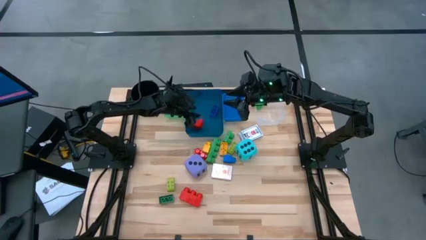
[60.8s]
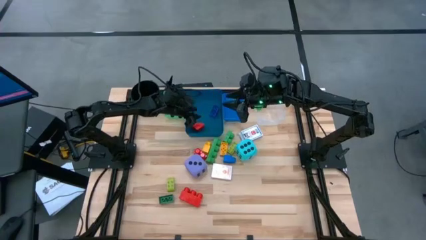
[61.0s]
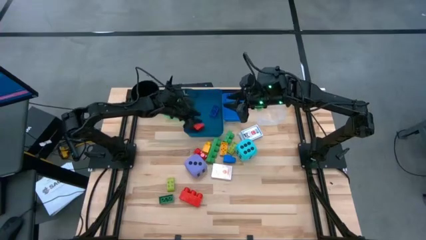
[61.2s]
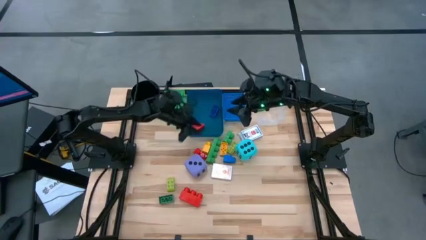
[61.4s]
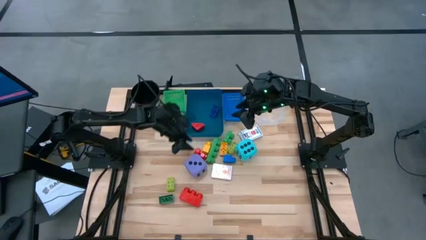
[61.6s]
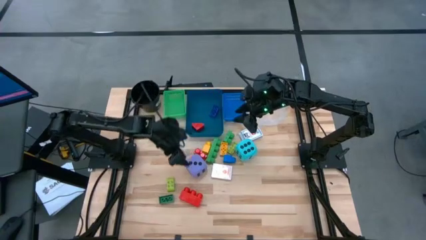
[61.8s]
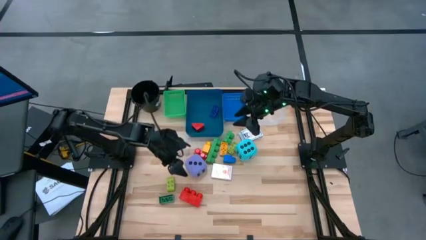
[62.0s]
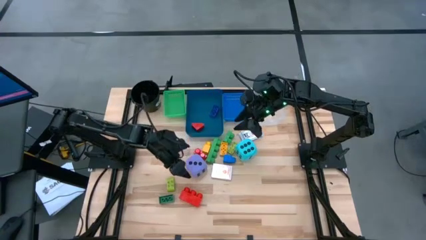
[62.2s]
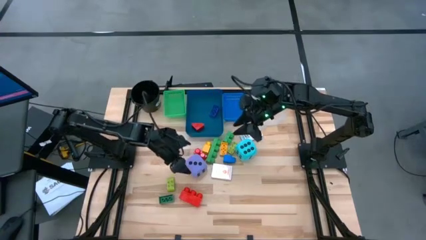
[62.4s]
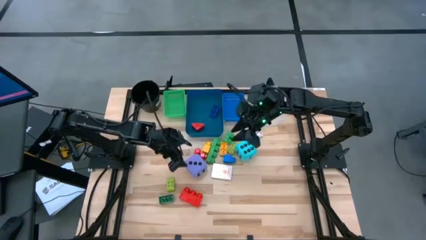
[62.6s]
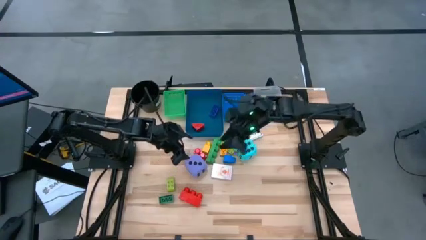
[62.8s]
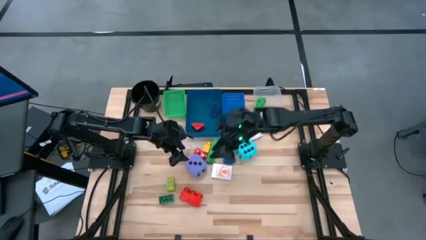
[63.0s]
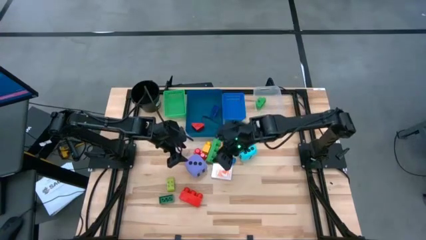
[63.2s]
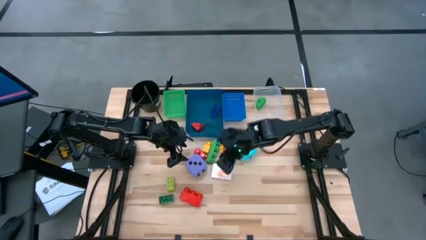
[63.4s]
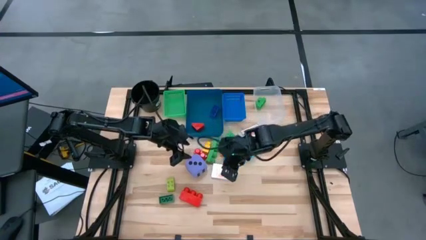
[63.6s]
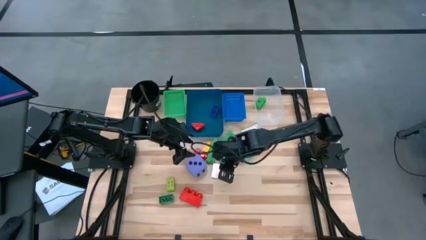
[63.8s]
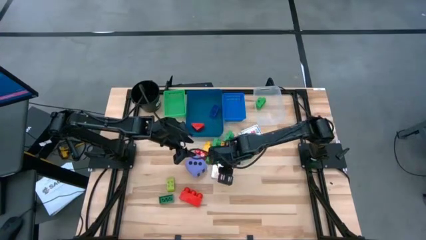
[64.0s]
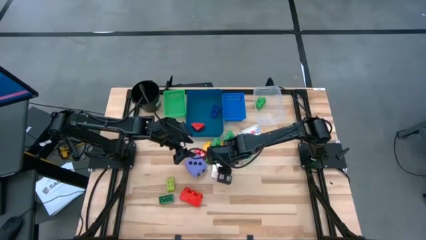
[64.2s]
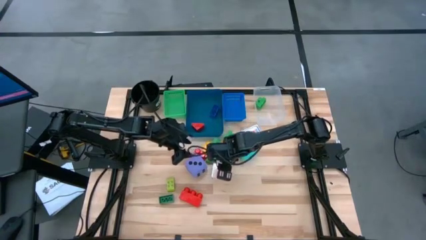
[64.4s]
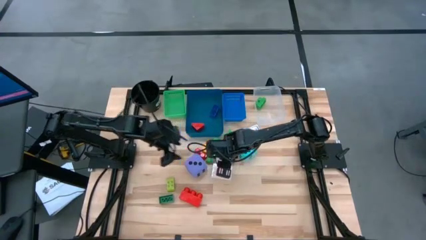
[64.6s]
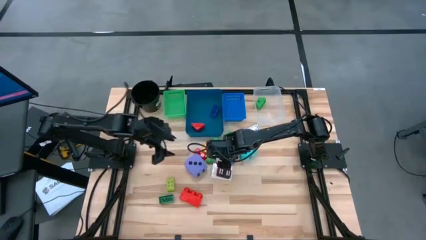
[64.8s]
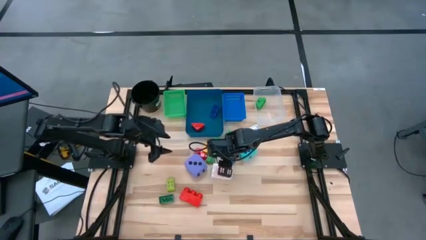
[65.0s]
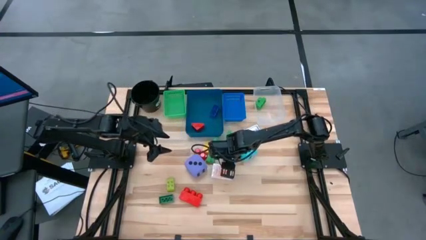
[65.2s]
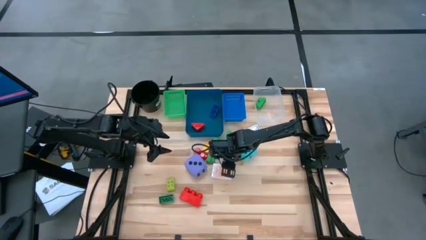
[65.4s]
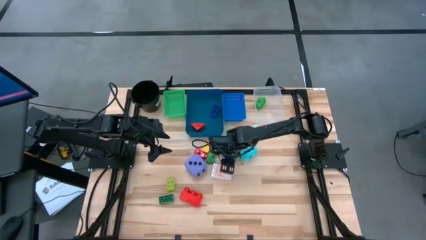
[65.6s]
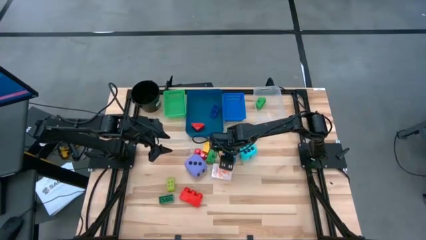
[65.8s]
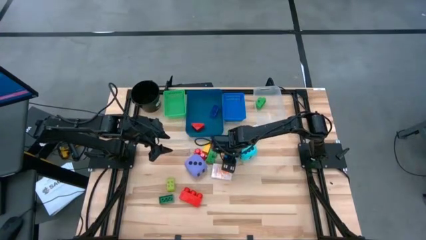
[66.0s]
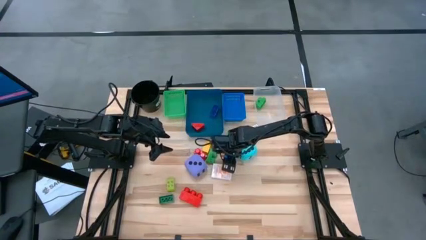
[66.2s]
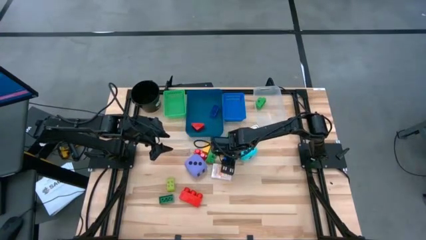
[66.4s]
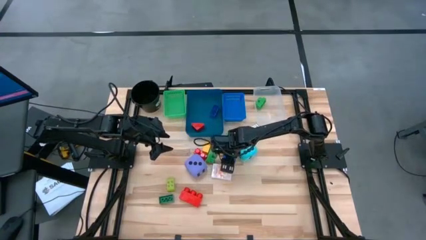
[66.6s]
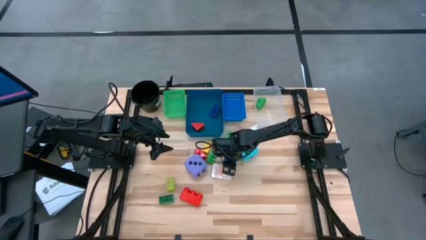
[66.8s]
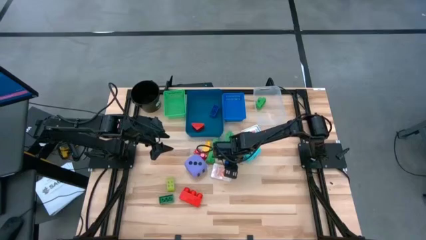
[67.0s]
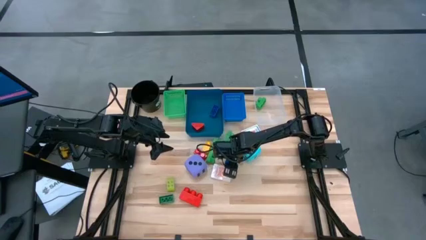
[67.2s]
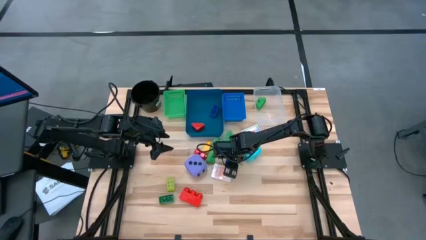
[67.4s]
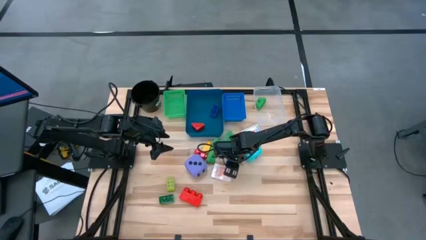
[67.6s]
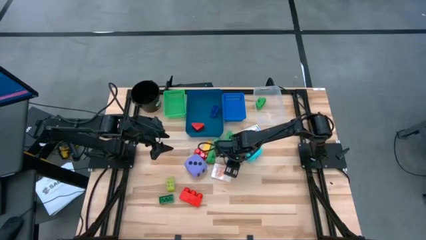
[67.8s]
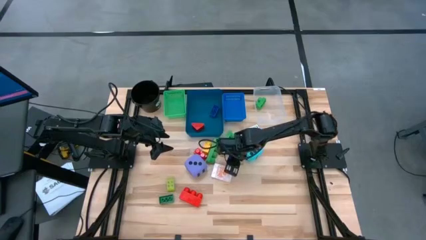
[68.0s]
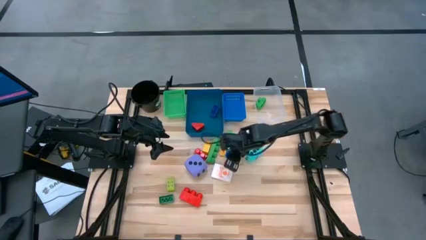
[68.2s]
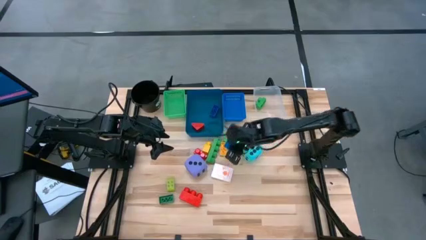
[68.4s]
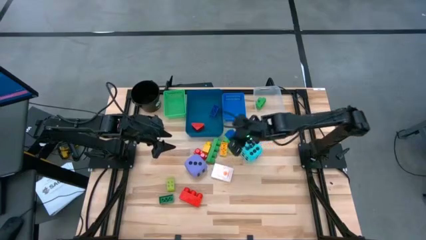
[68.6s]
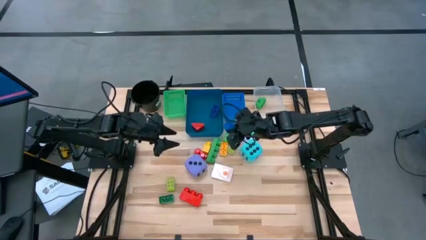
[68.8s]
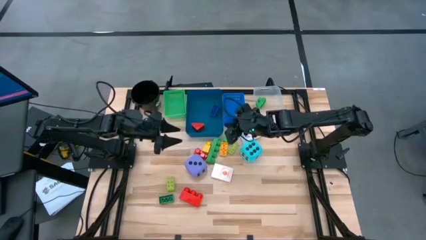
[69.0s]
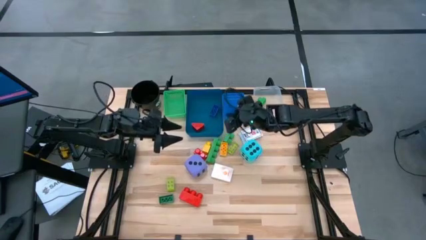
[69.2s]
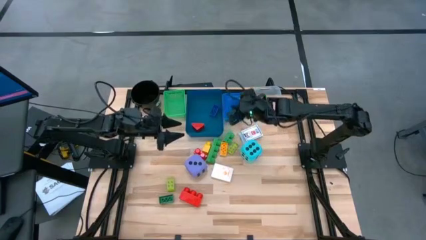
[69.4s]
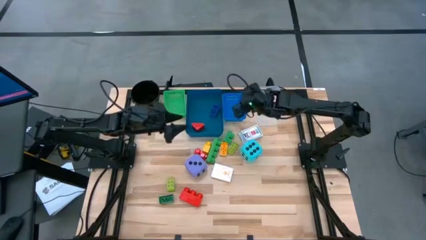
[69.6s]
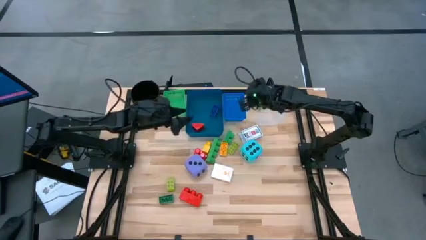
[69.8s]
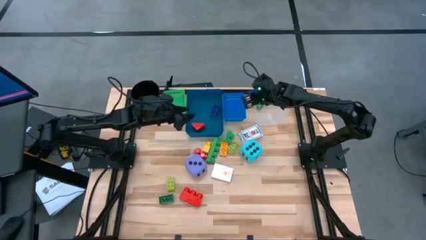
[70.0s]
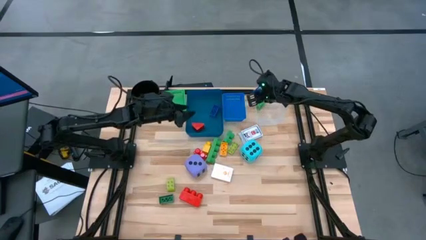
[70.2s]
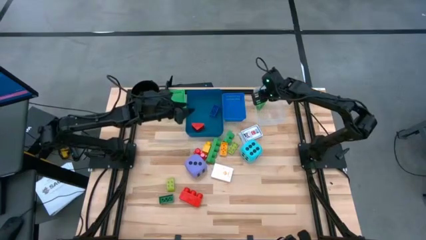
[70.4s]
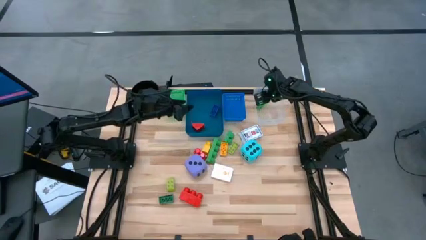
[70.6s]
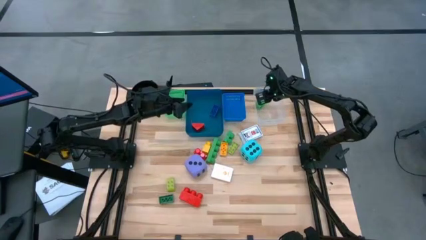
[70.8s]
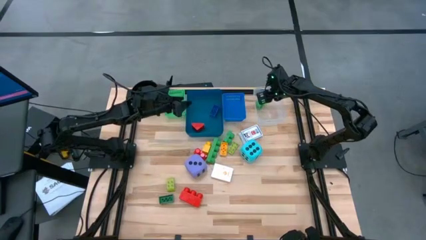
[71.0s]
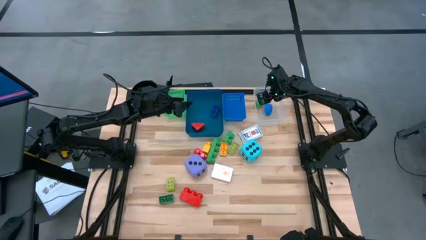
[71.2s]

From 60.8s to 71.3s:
Task: Pick & Place Toys
Put the large blue game piece into the transparent bin

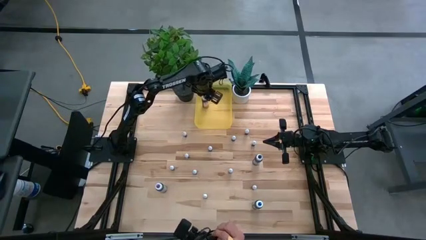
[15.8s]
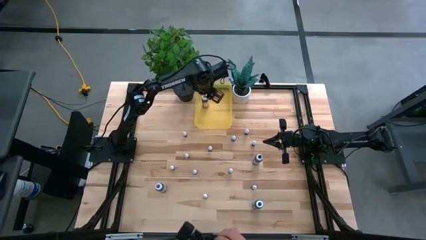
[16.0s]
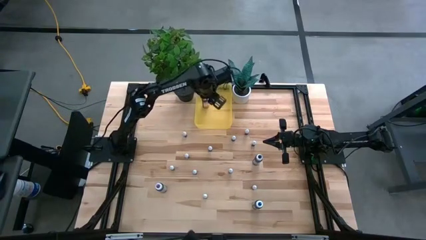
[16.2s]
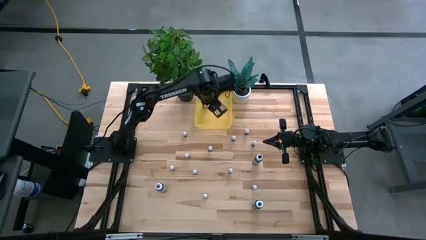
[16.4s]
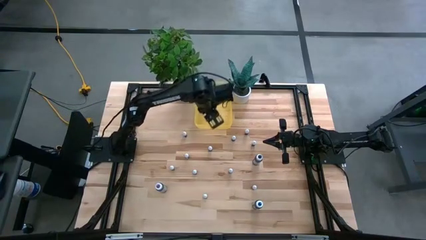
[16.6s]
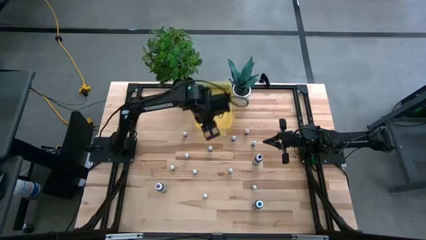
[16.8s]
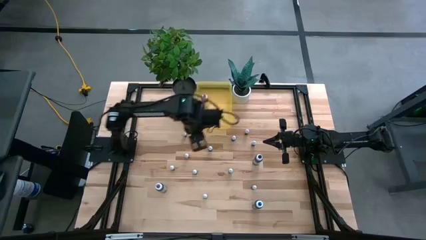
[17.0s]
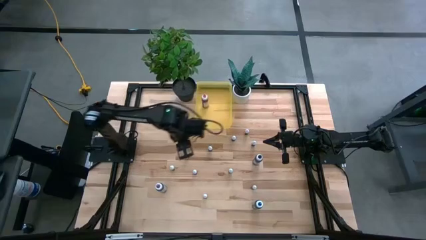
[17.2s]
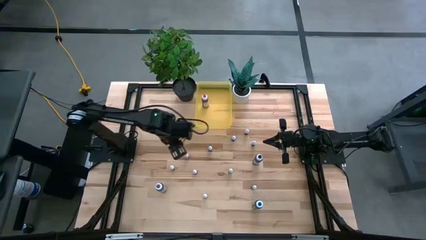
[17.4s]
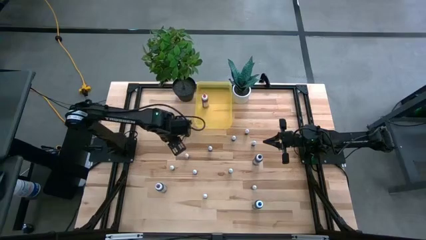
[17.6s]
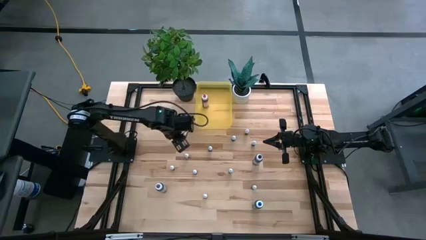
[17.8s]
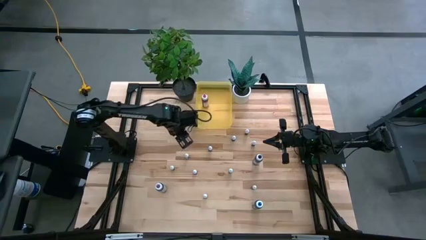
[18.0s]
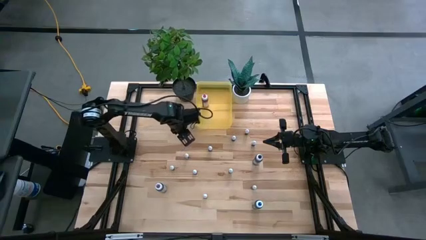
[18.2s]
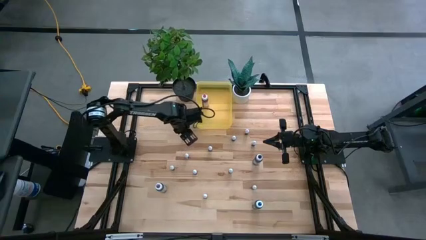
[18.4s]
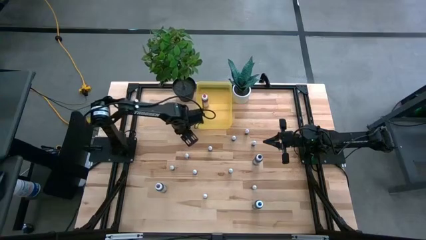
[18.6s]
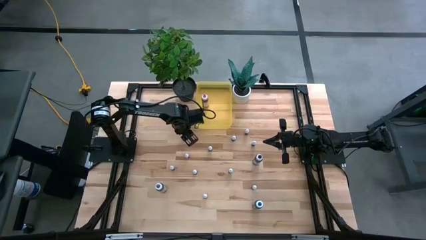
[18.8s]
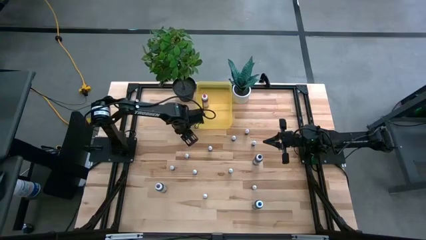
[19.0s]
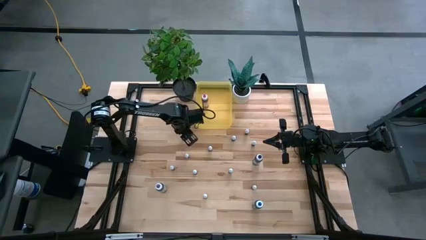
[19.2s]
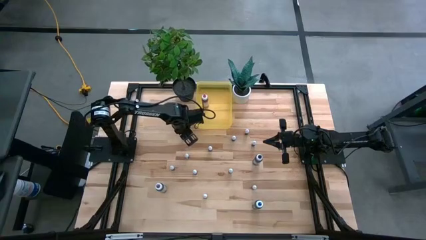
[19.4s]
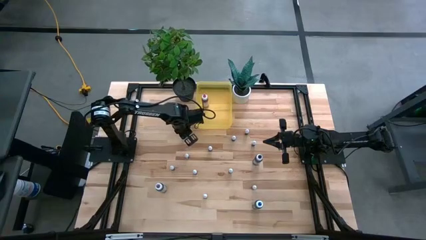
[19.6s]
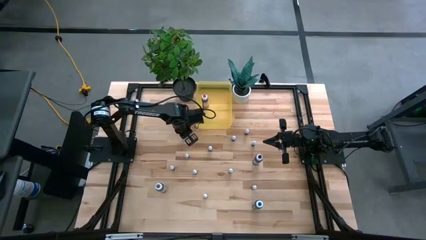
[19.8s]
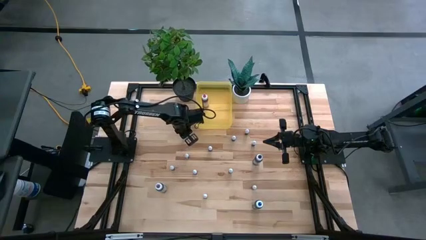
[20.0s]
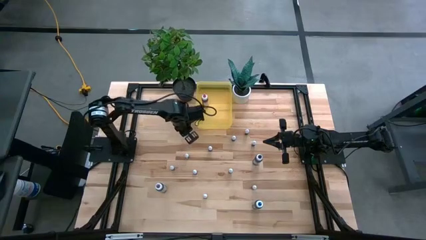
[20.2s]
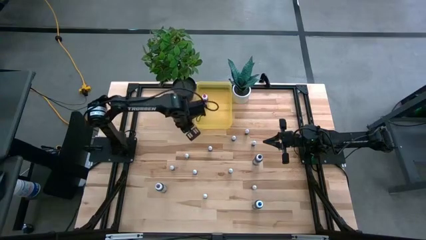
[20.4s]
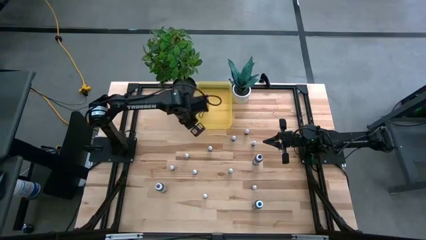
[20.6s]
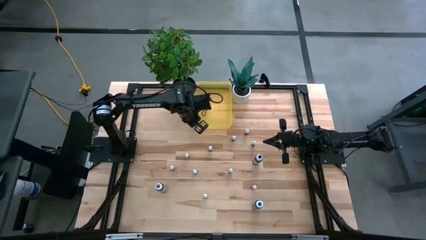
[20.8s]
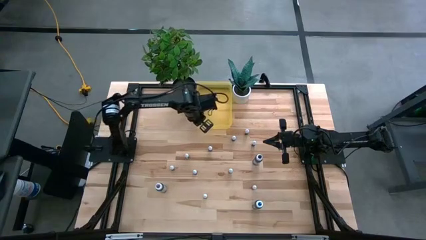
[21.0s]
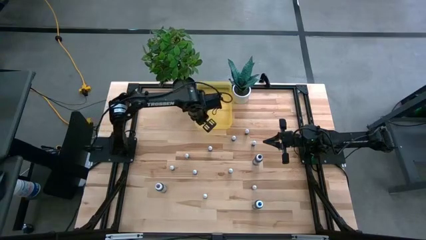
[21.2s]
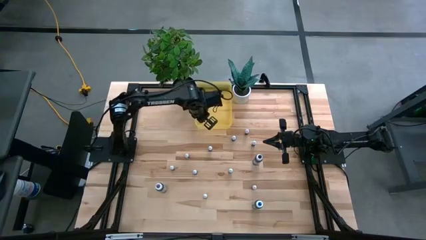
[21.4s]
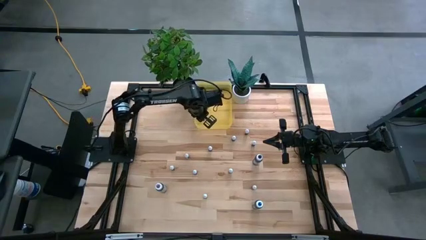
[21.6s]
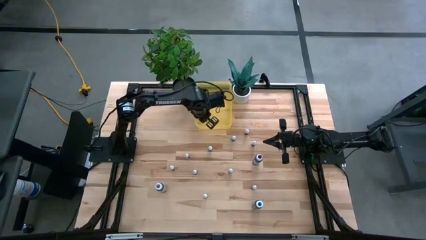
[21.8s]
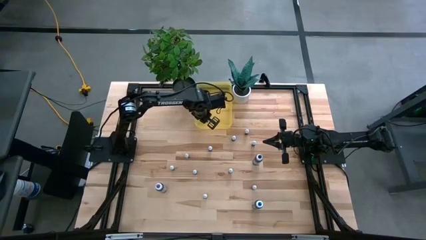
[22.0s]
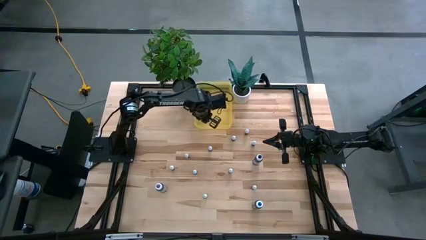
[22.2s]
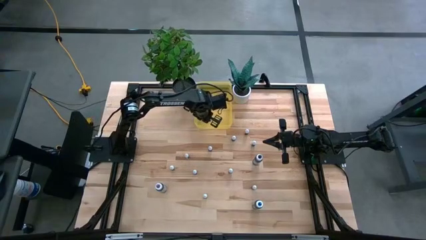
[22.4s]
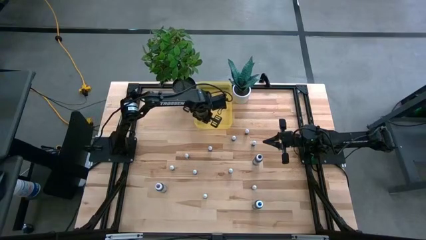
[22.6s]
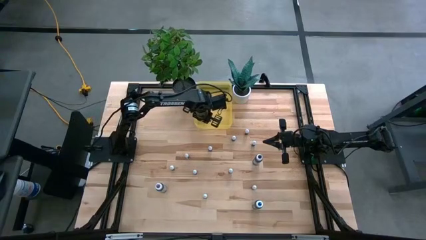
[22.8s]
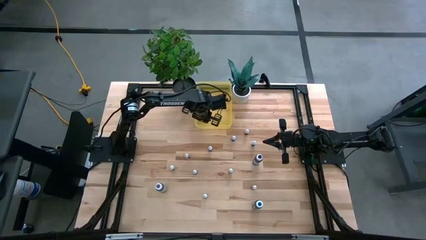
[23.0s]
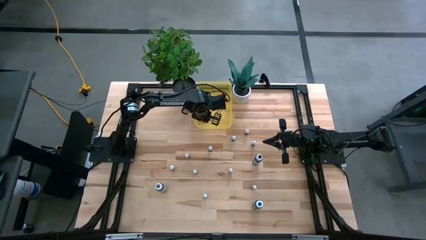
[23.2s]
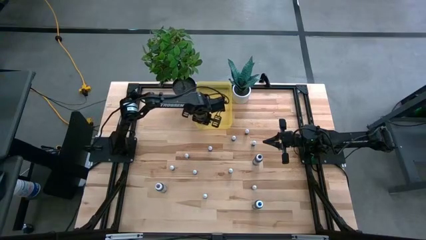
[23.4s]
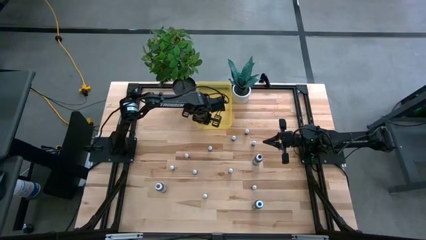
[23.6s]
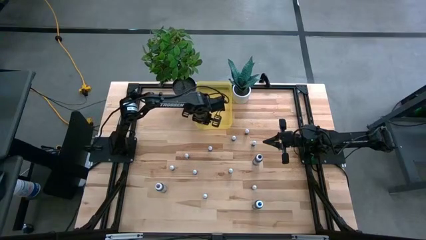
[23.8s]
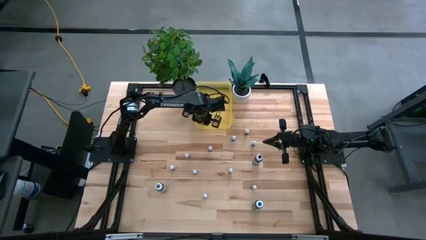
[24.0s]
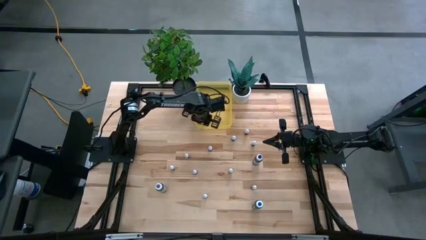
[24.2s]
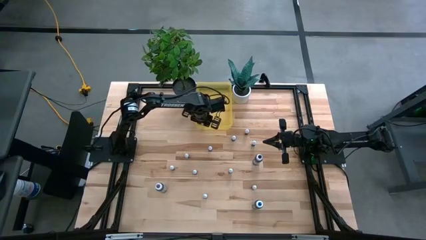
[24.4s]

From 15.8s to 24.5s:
Task: Pick & Place food coloring
Put the small red food coloring bottle into the yellow bin
